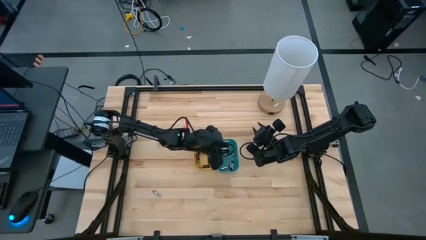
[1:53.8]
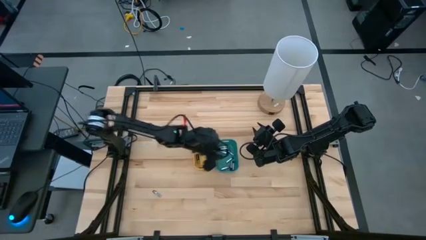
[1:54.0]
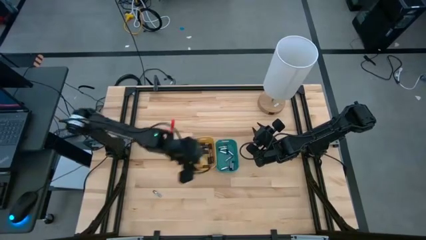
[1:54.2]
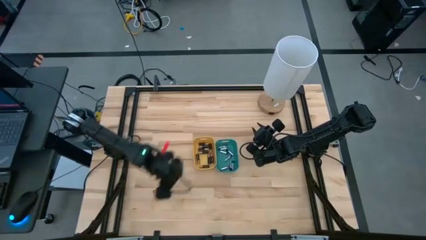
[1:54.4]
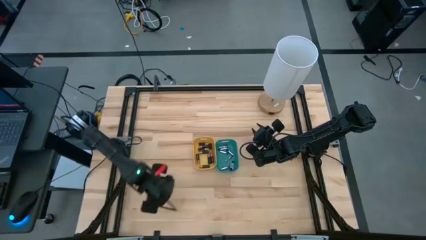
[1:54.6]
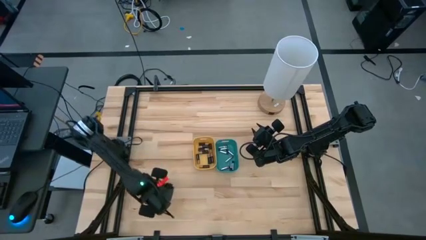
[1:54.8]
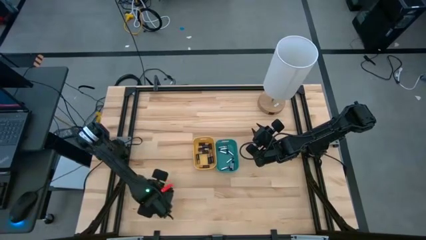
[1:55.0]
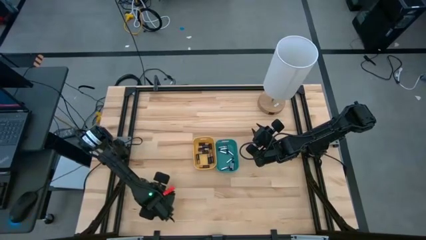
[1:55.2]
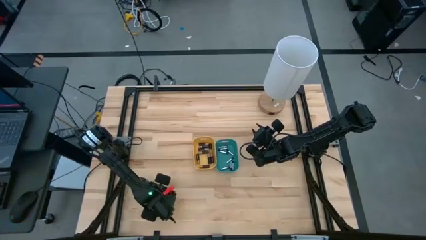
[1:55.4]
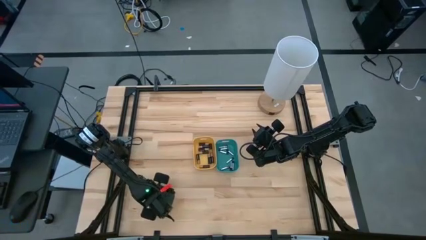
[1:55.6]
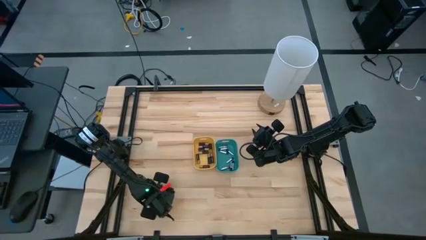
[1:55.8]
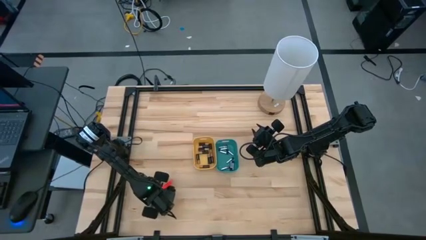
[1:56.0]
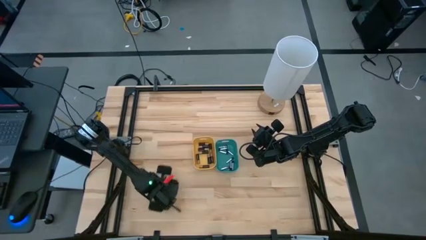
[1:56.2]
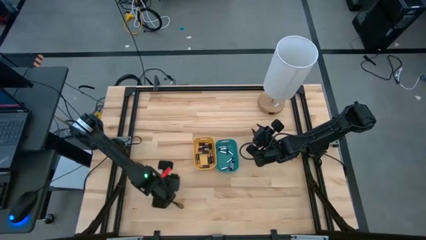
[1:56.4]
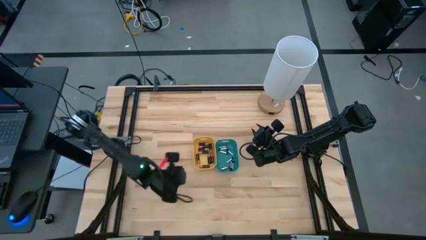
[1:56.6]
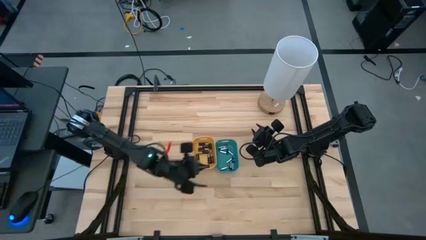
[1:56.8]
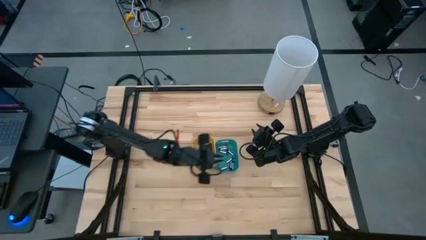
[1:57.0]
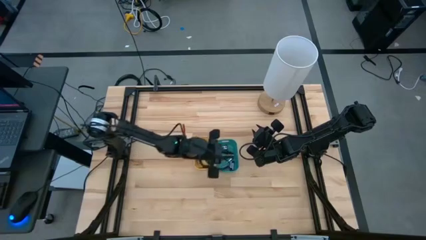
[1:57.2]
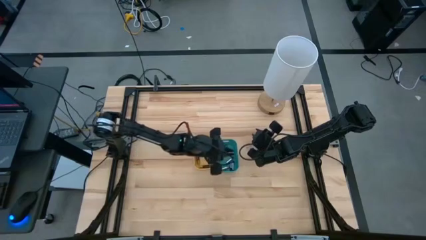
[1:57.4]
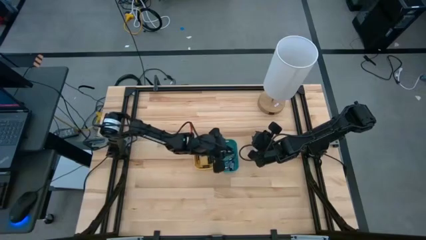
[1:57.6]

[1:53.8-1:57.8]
Task: Sort batteries
Put the silver battery into the green bin

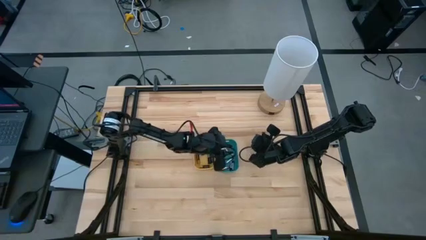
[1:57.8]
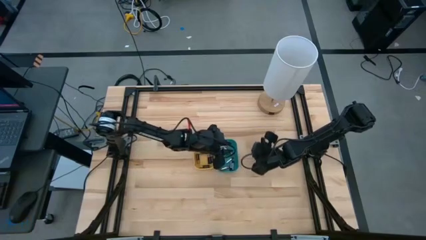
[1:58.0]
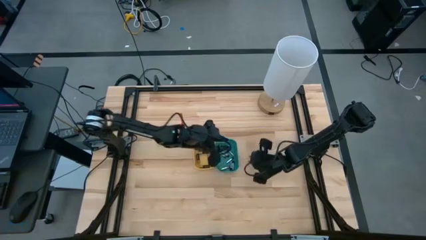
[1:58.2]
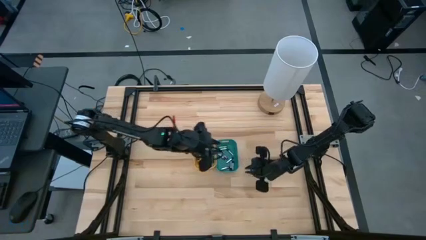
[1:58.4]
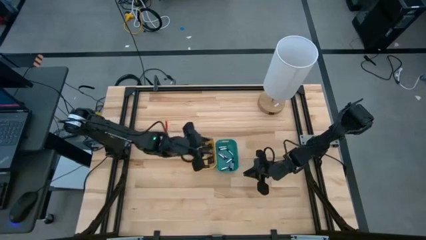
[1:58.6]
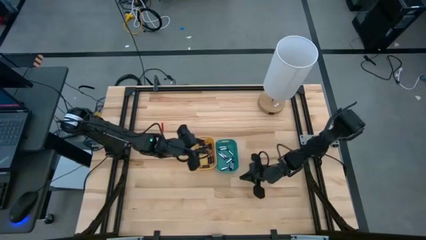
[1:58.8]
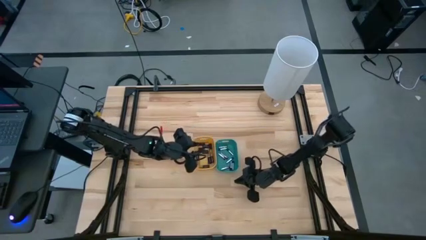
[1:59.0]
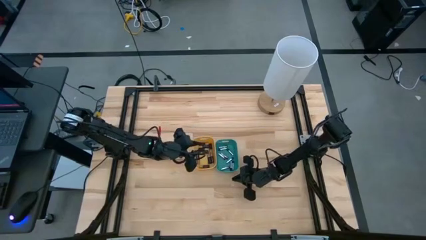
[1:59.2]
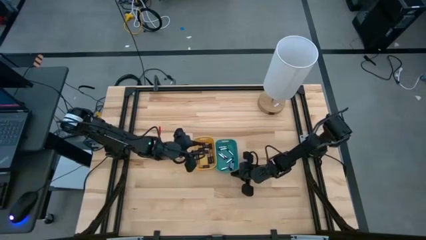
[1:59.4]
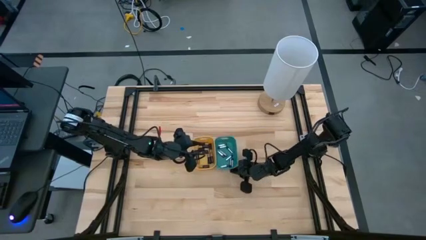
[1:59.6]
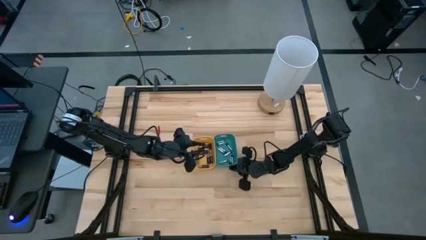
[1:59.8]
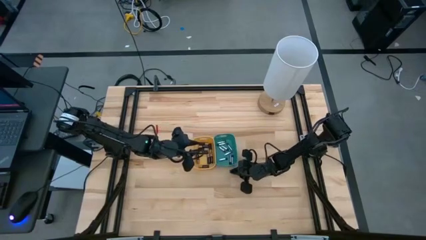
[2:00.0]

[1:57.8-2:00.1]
Adjust the green bin

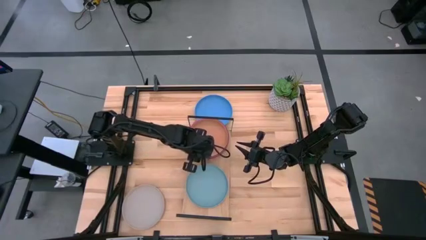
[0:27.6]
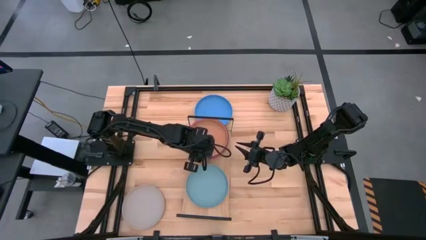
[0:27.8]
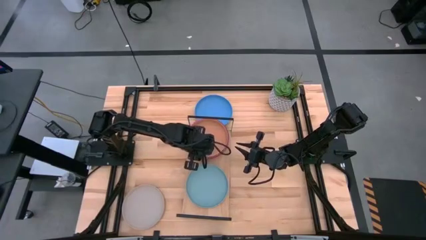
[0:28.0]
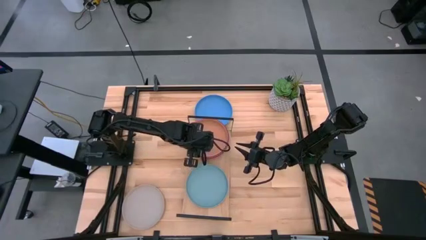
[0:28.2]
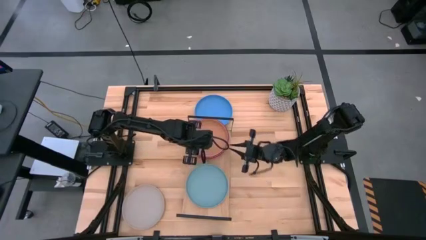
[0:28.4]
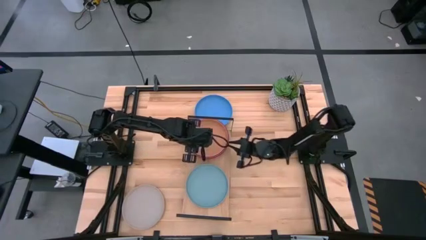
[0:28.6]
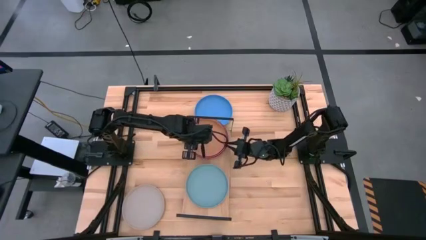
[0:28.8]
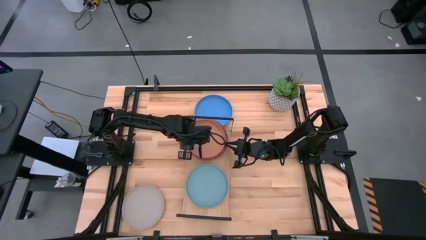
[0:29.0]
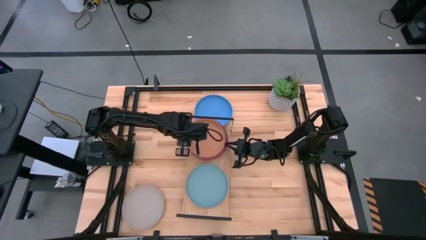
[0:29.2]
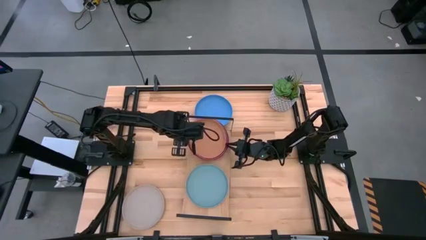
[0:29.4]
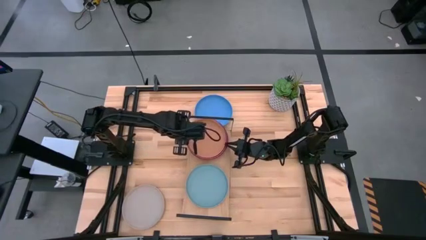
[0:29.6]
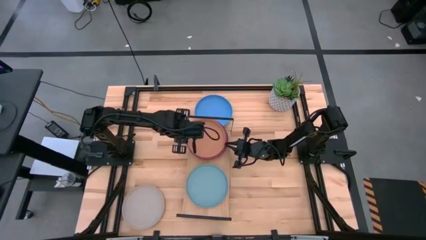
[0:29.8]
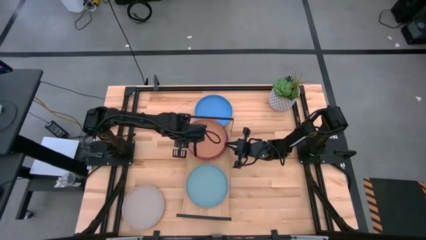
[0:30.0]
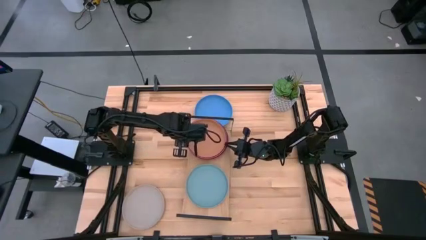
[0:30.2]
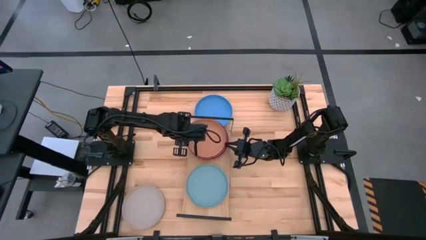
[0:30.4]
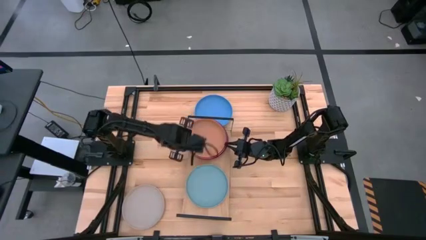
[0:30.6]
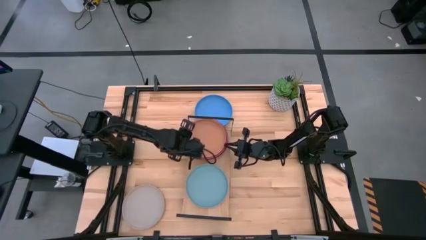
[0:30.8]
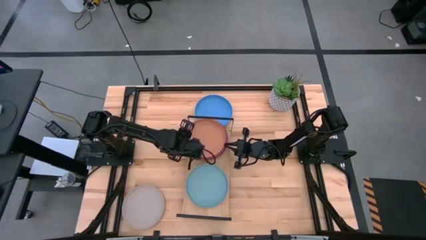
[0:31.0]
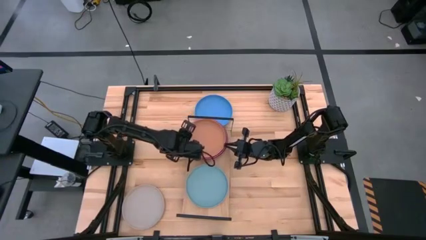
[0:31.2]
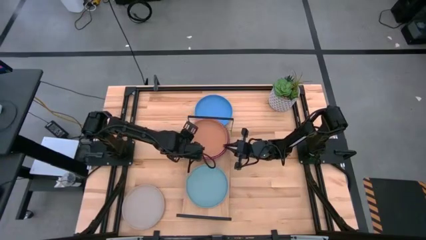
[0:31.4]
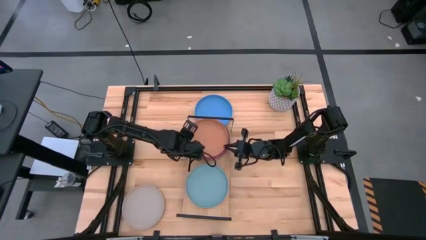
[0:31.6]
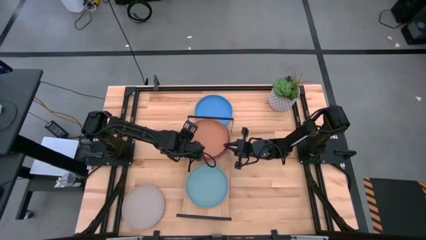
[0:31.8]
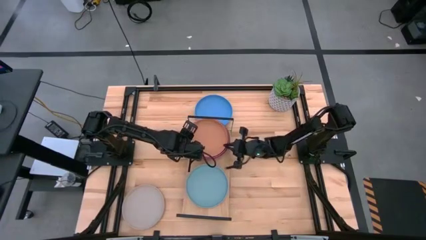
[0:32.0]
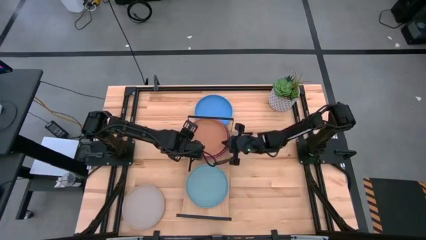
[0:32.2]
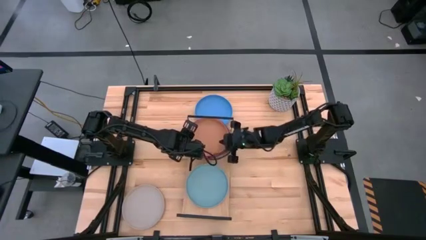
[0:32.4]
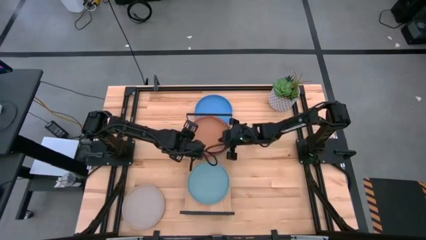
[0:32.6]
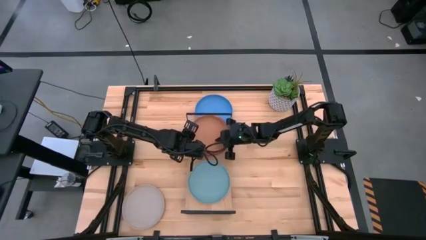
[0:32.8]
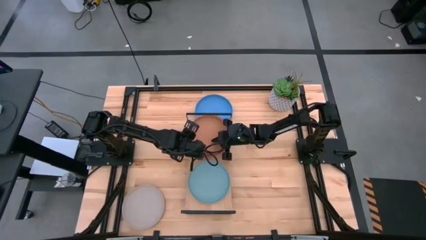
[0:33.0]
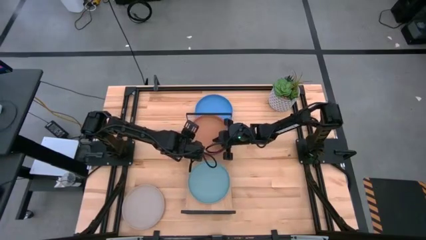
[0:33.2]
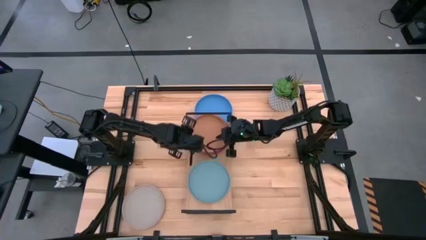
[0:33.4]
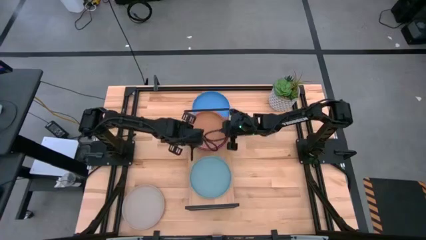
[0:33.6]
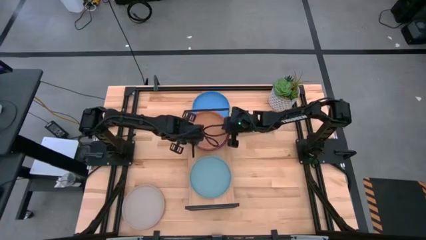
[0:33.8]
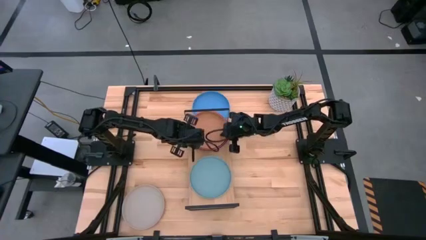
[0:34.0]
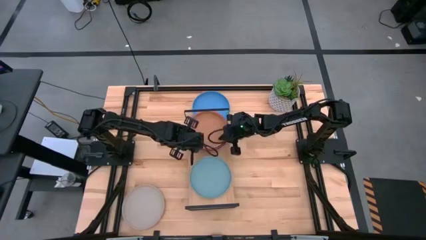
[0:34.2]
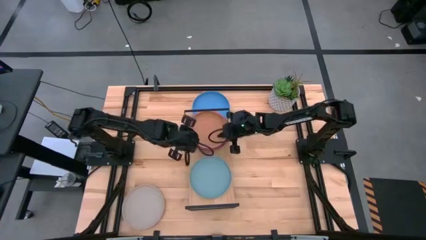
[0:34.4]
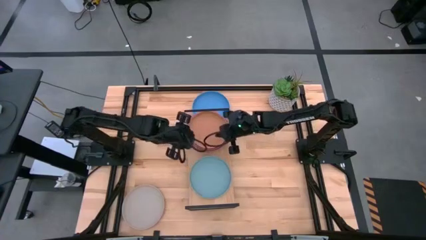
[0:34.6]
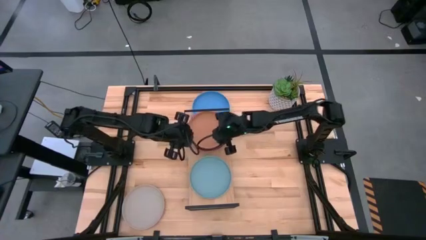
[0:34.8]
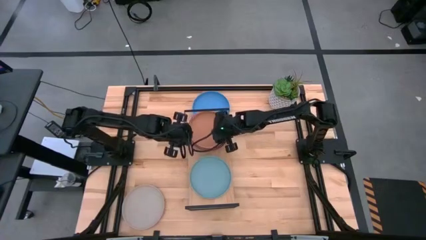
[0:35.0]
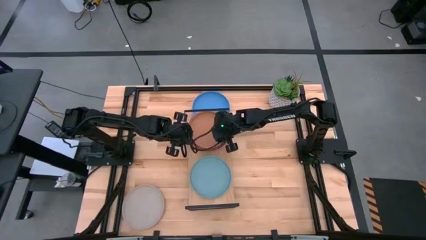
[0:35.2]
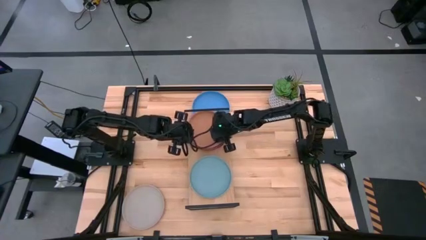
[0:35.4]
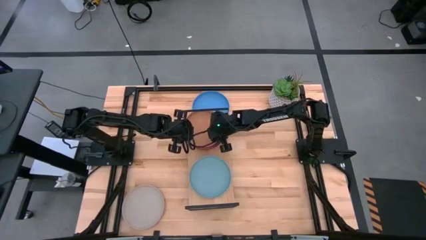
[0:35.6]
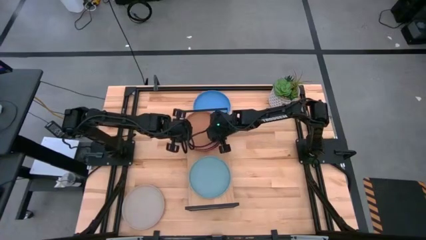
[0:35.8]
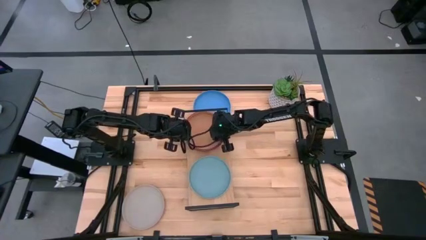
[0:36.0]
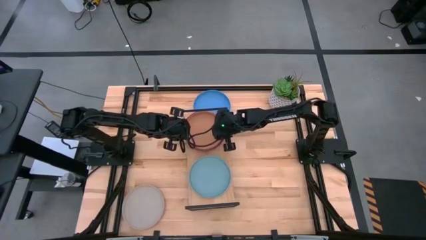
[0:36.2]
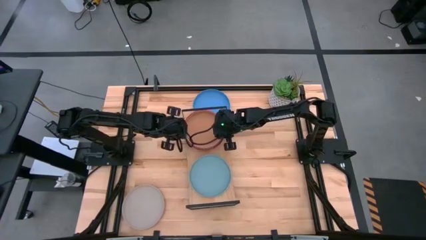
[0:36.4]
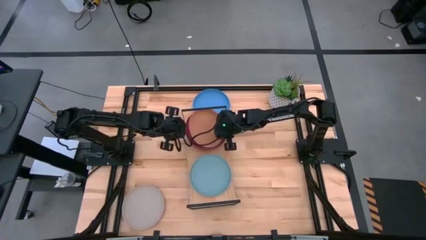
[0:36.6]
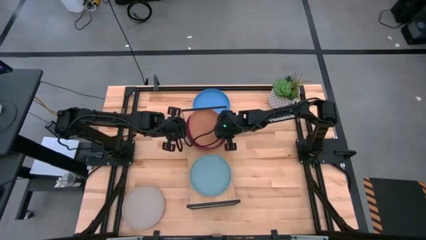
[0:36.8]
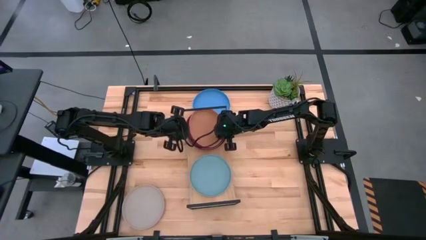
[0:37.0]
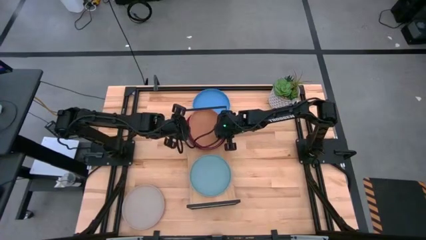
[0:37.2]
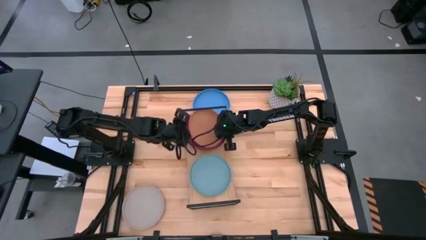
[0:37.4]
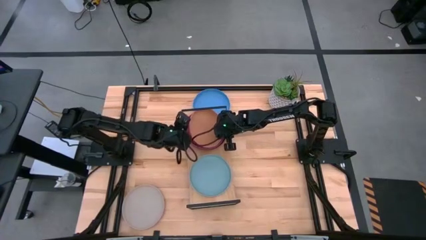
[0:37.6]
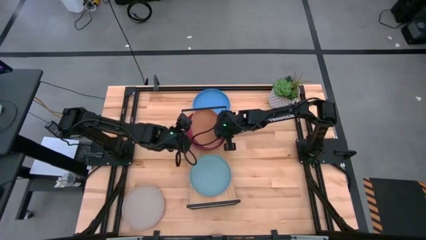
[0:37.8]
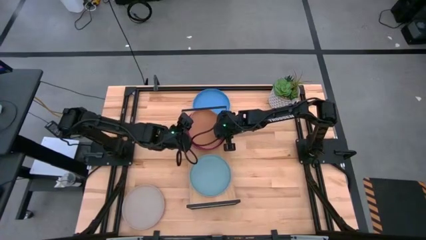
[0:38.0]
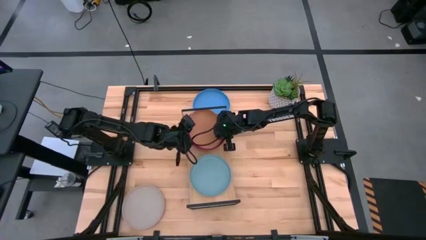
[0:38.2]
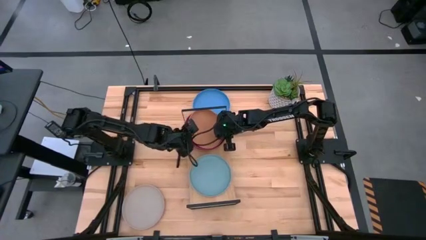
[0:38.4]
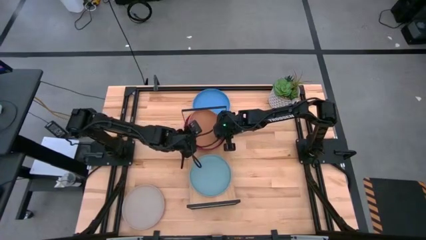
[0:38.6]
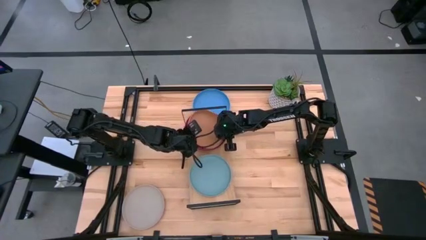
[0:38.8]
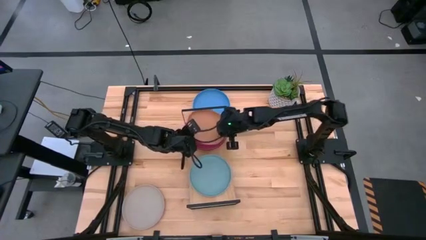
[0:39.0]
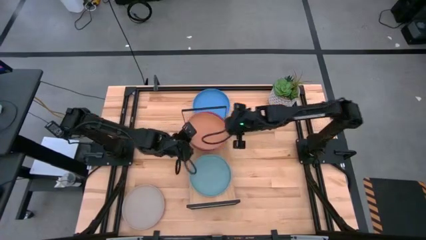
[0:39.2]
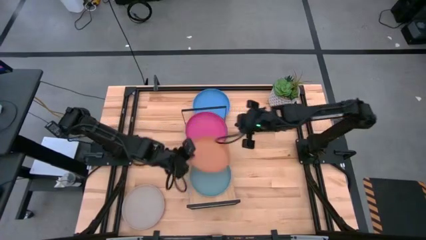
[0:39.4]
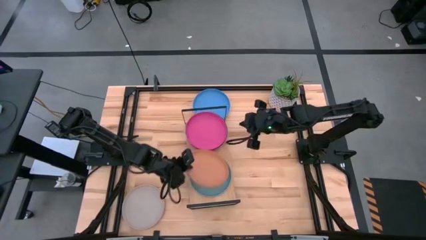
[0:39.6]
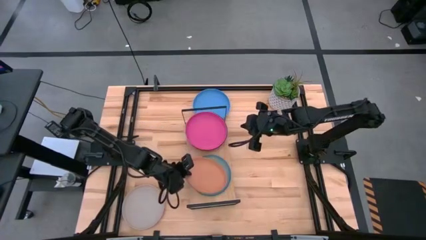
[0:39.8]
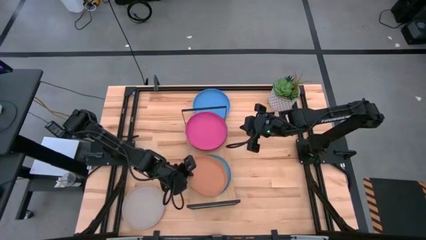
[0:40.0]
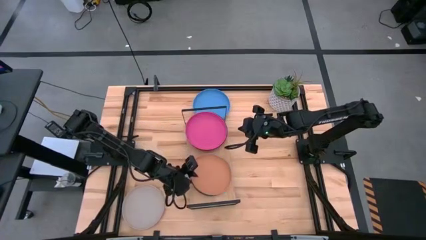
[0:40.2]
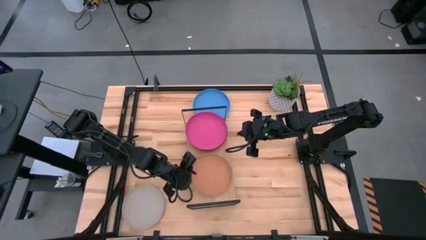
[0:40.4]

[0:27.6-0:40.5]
Task: Place and stack plates onto a shelf
Stack the brown plate on top of the light blue plate on the shelf
